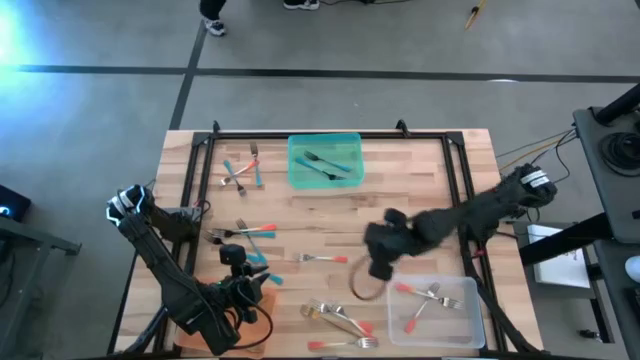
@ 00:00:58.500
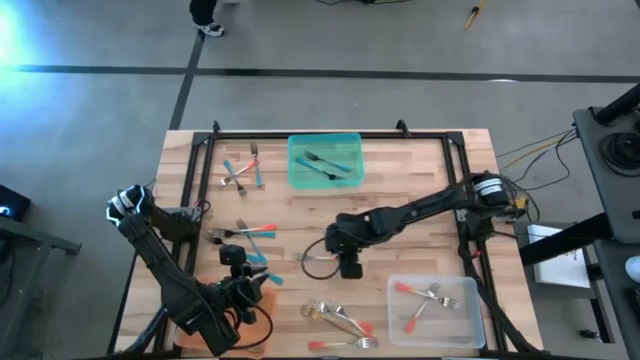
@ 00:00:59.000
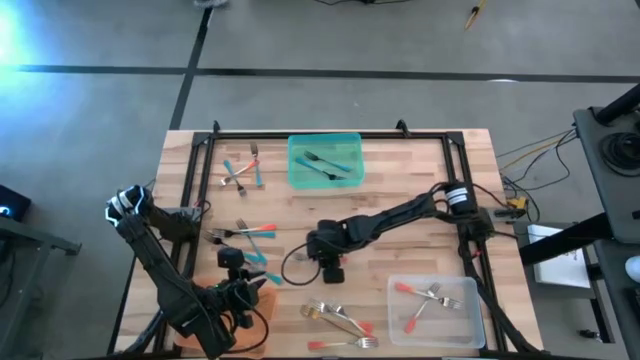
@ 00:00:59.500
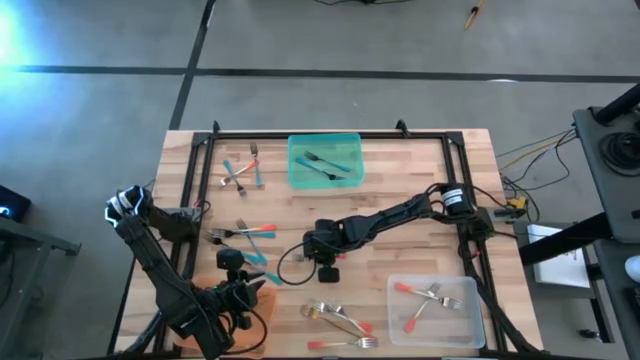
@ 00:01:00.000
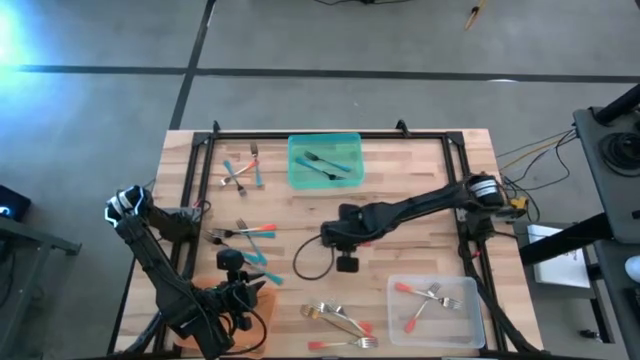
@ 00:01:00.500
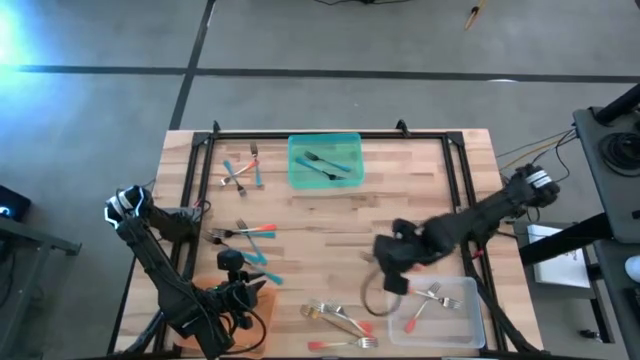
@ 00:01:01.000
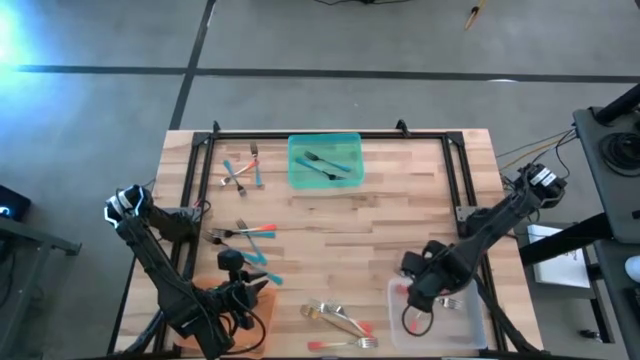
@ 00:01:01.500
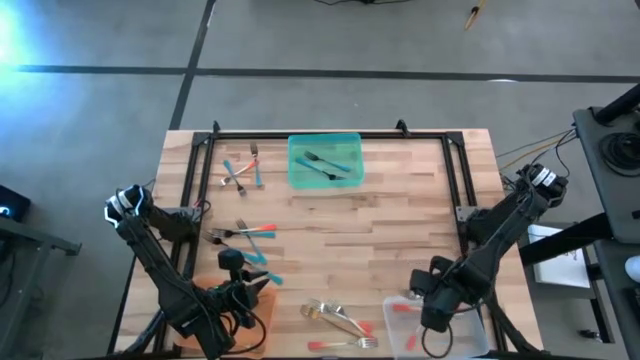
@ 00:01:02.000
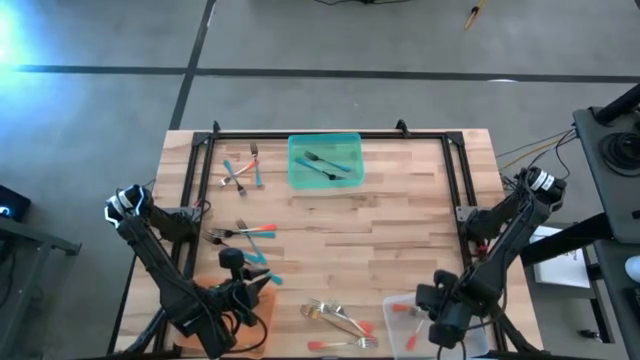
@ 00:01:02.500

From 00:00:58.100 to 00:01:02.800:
Task: Sort silverware by color (type)
Put the orange fork into the transparent bin

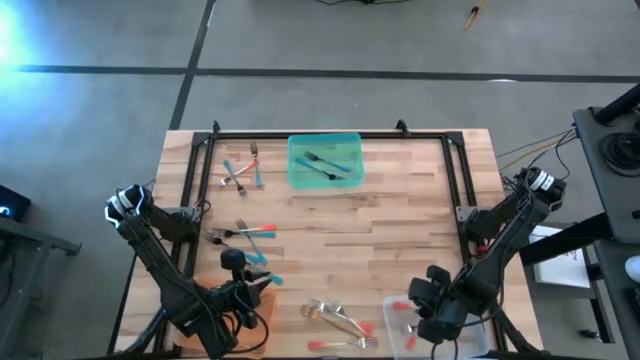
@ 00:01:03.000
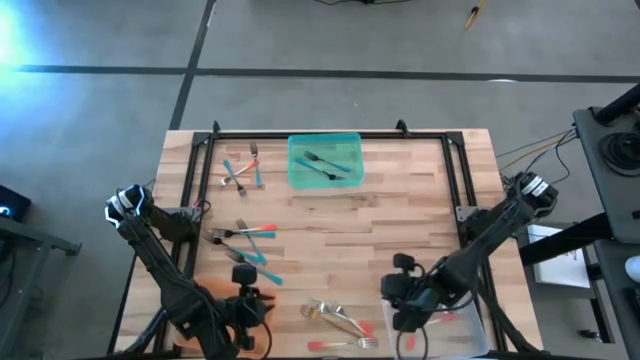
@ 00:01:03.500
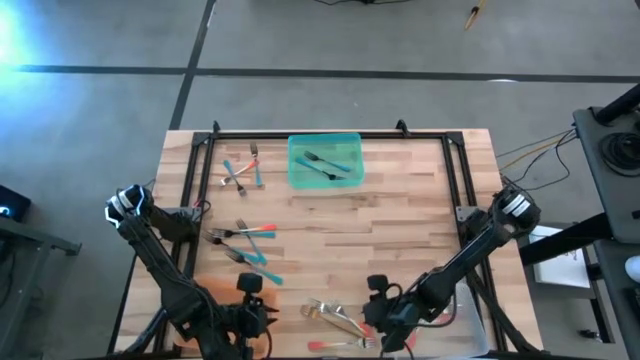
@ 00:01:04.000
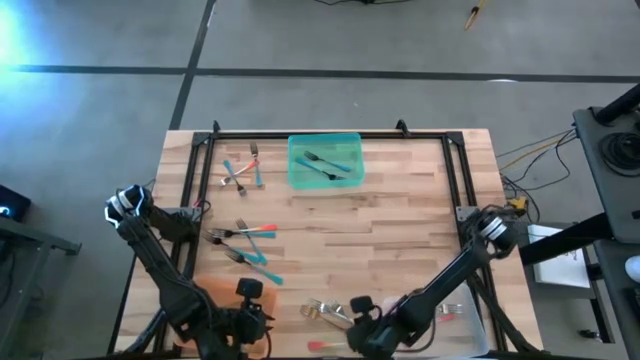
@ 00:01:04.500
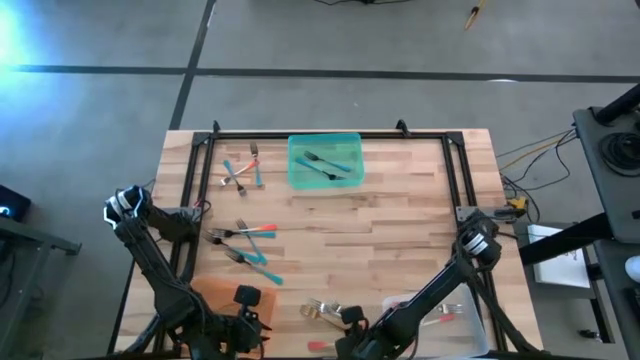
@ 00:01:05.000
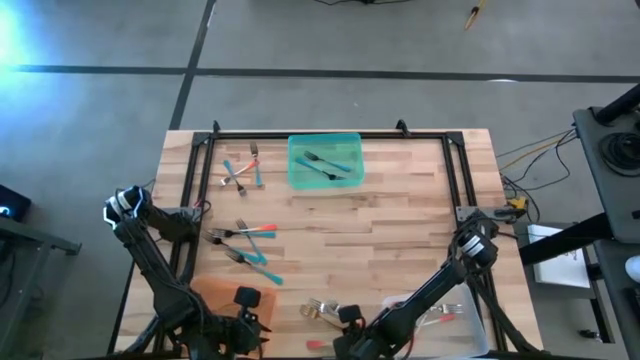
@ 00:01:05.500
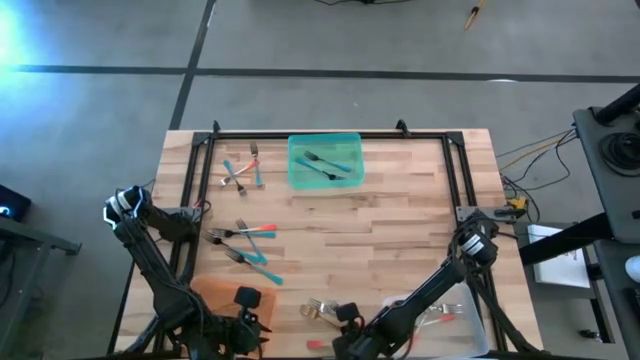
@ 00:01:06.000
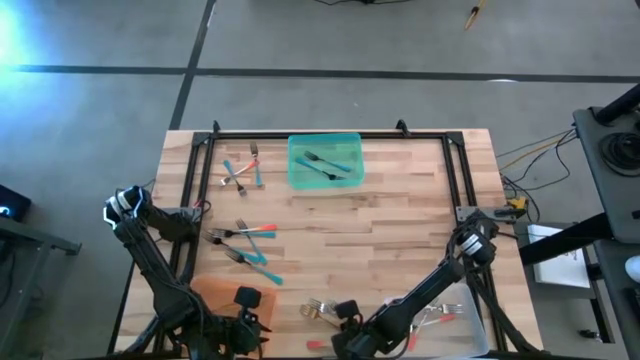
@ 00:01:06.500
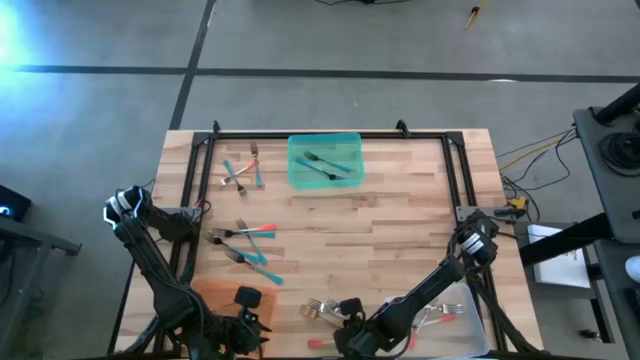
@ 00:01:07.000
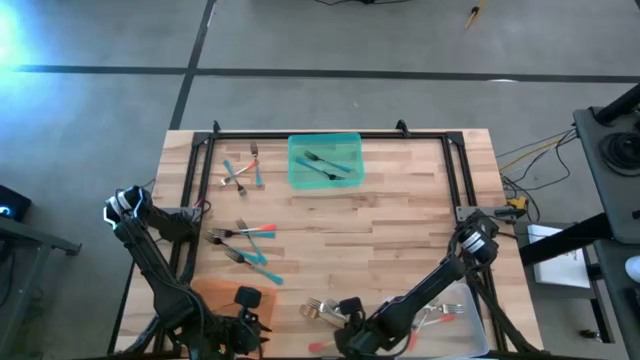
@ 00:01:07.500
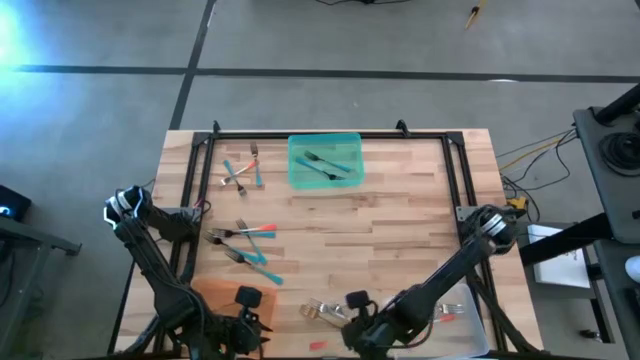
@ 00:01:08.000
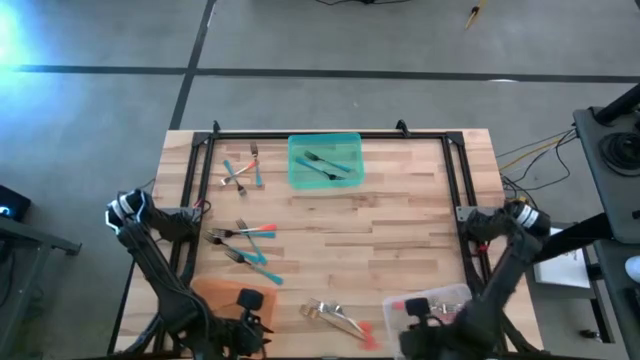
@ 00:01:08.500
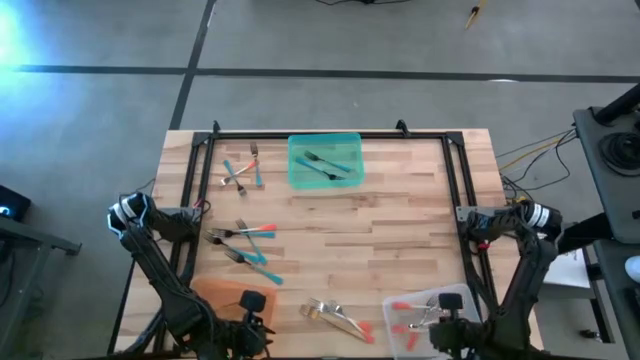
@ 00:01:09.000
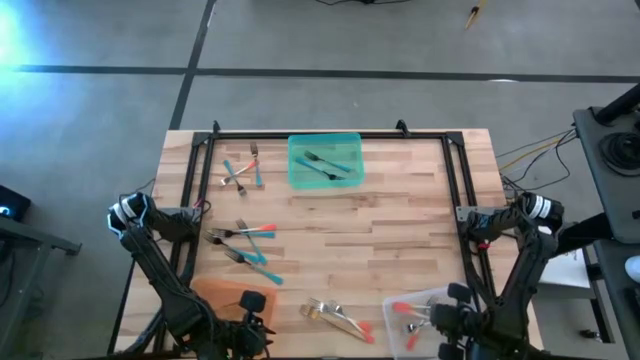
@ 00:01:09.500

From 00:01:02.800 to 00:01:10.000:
Put the orange fork into the transparent bin

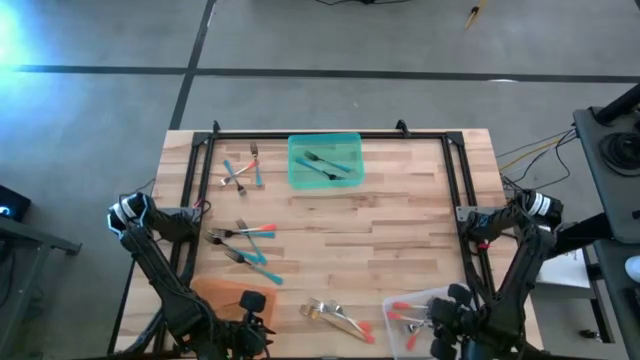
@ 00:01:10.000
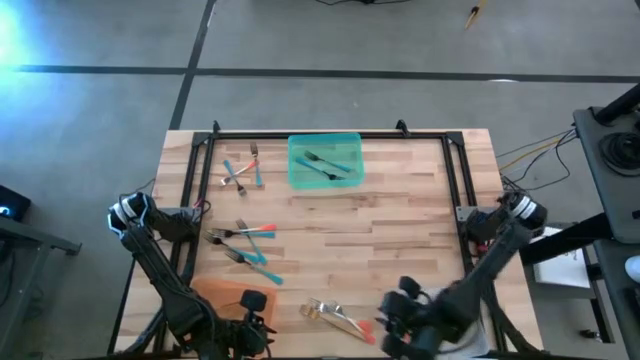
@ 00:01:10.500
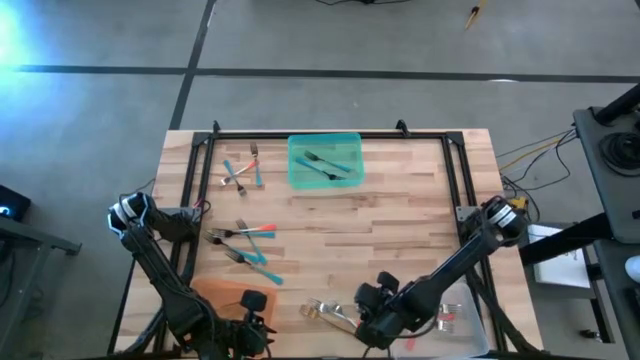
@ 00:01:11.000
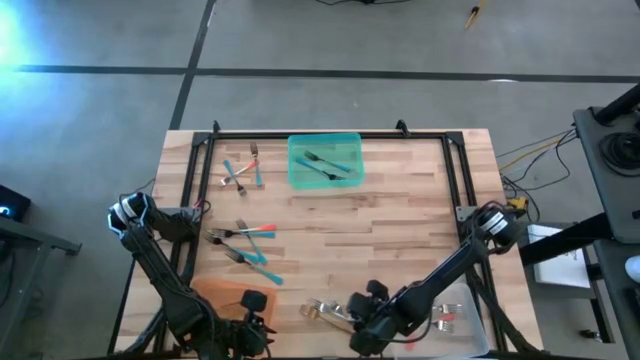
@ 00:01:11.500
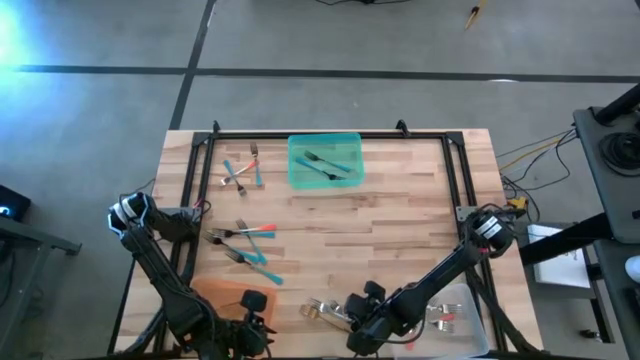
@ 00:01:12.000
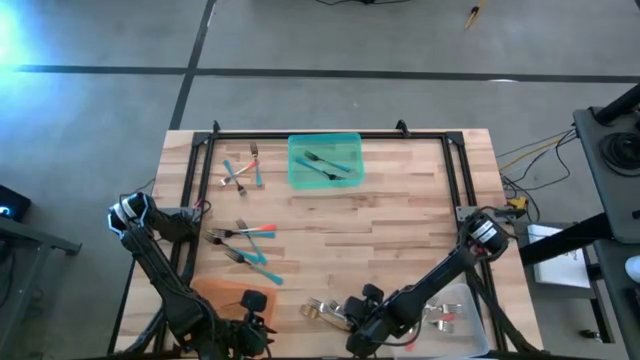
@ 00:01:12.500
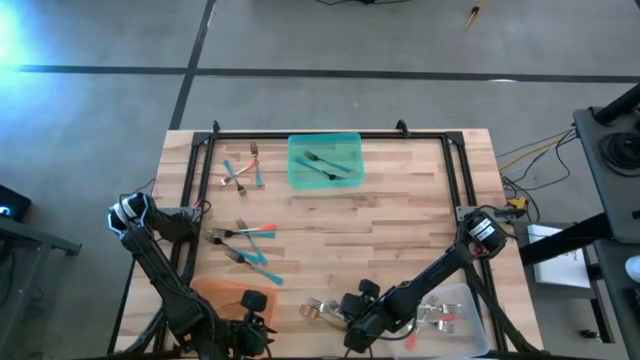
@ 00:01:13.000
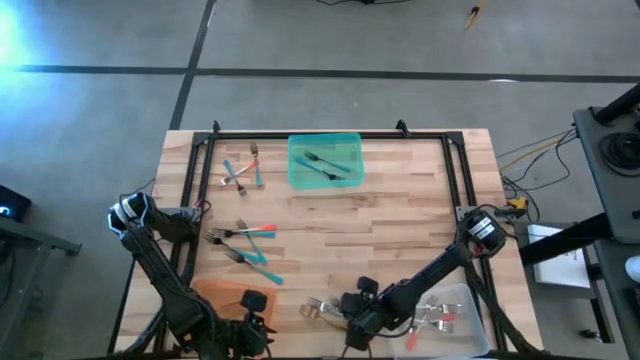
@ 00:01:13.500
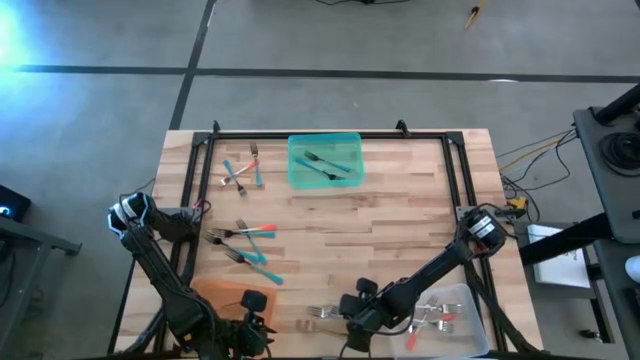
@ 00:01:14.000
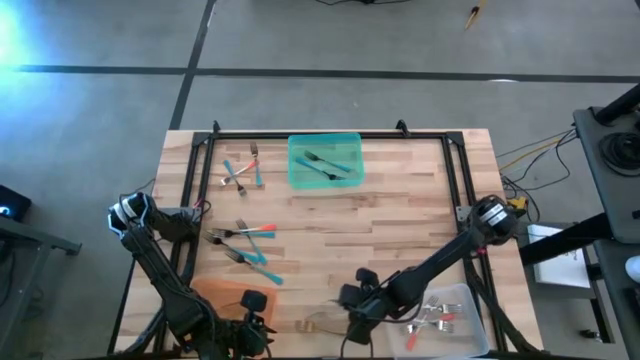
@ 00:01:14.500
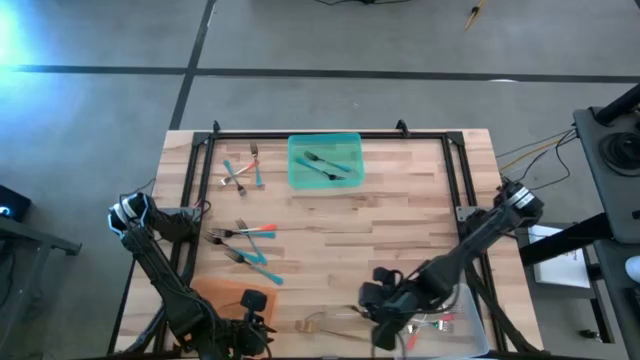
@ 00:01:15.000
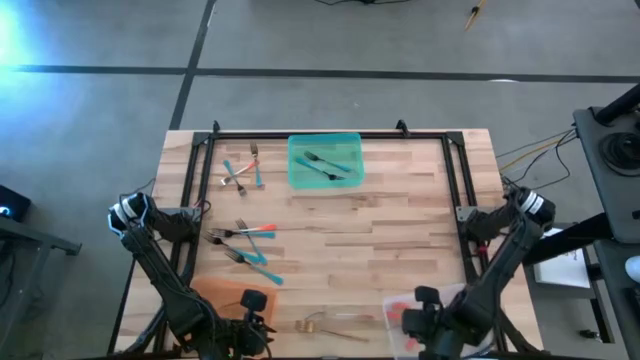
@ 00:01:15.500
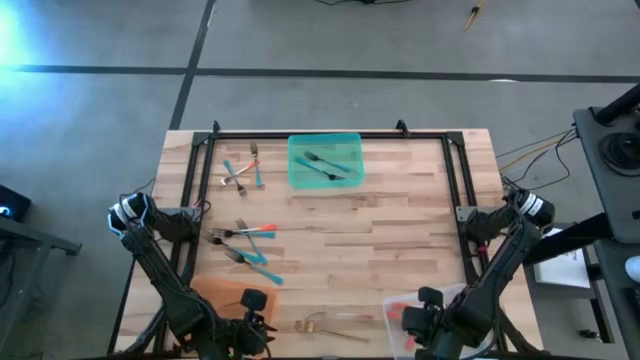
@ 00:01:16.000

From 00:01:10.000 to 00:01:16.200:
Put the orange fork into the transparent bin

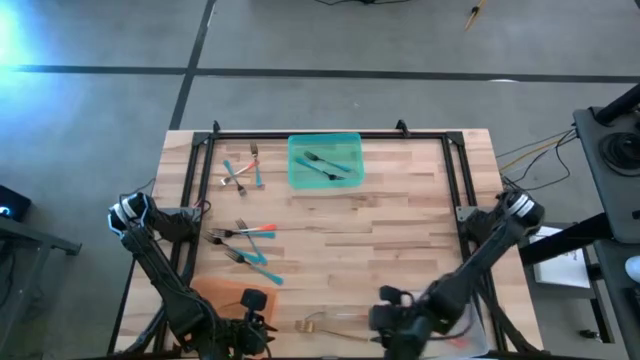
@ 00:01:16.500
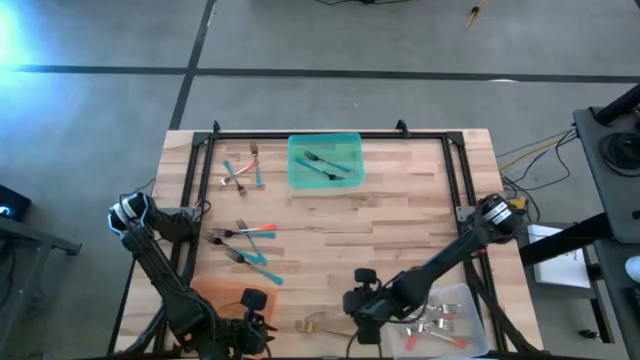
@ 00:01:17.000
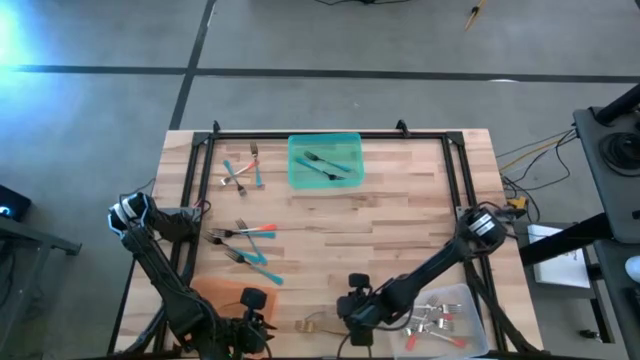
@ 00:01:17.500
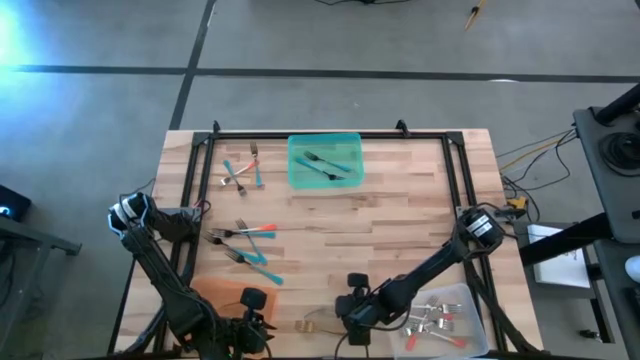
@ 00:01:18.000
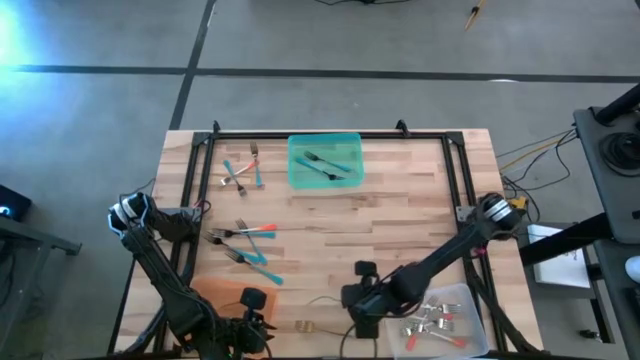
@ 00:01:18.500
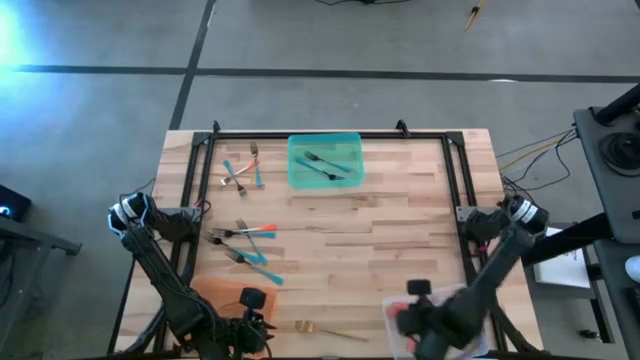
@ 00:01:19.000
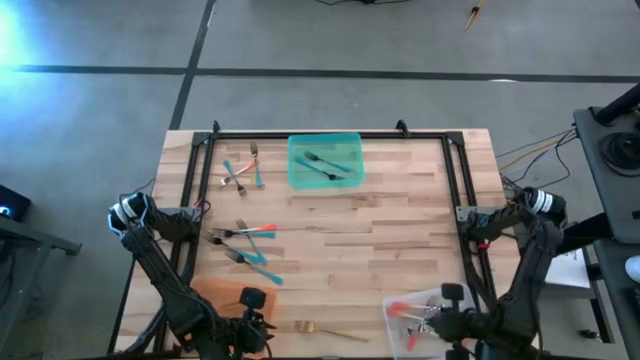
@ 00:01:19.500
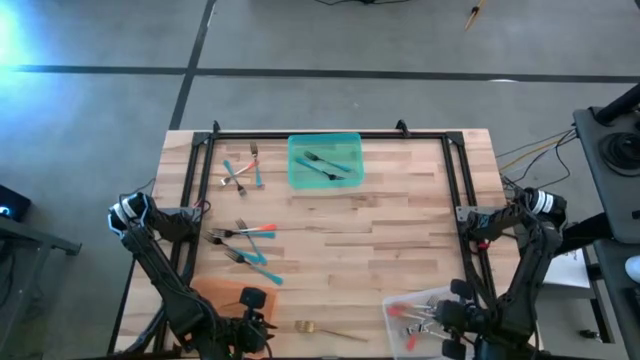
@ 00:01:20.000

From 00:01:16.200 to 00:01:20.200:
Put the orange fork into the transparent bin
